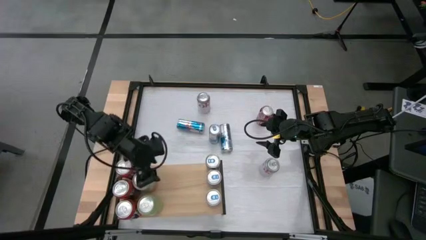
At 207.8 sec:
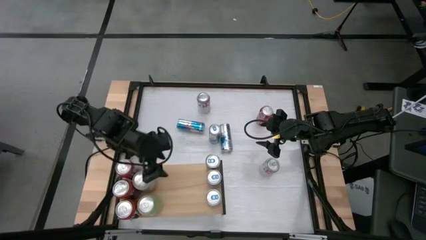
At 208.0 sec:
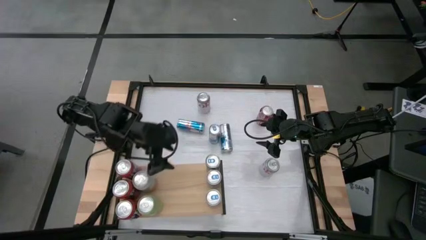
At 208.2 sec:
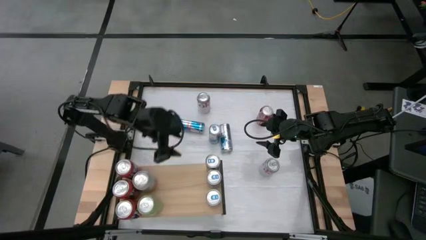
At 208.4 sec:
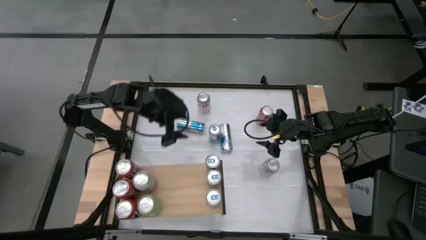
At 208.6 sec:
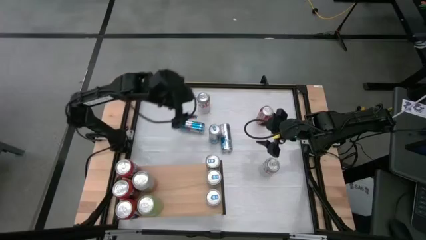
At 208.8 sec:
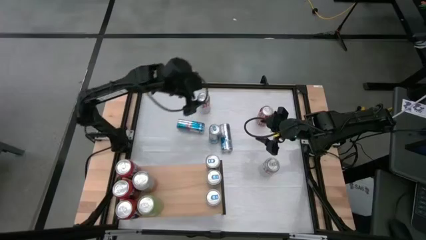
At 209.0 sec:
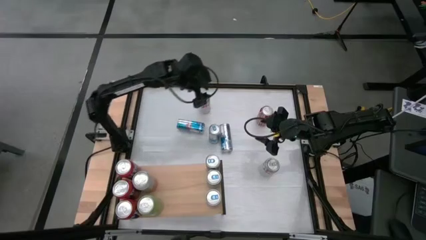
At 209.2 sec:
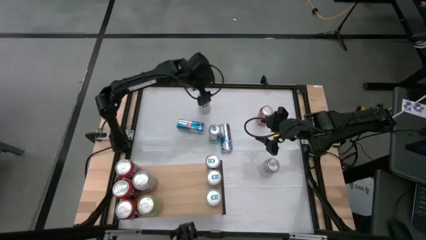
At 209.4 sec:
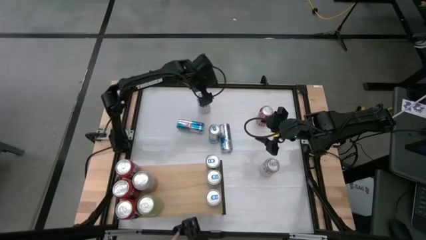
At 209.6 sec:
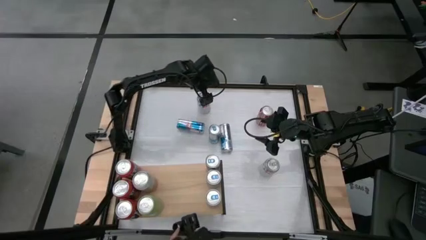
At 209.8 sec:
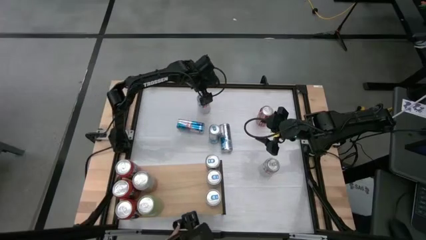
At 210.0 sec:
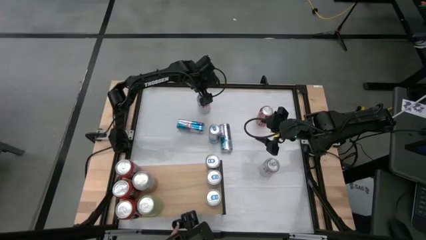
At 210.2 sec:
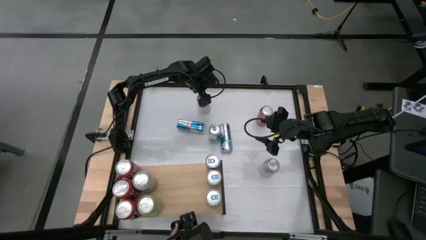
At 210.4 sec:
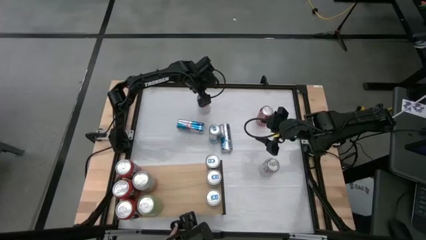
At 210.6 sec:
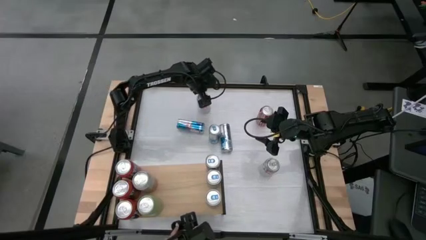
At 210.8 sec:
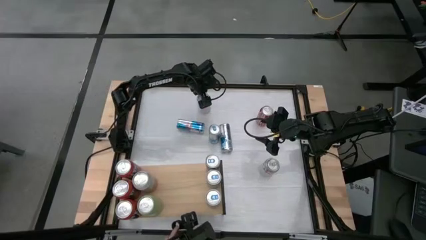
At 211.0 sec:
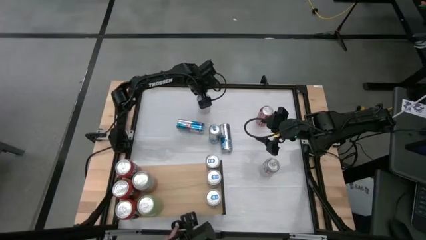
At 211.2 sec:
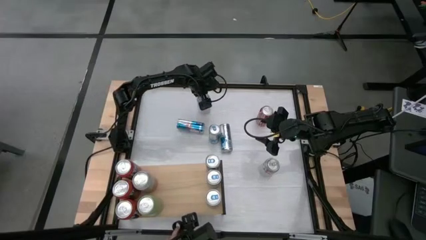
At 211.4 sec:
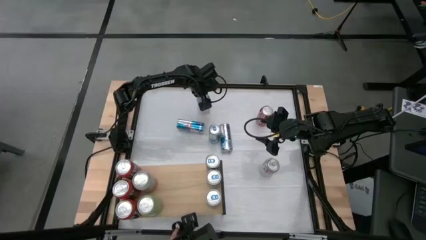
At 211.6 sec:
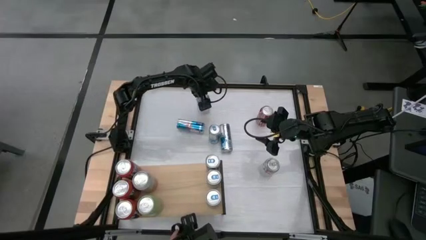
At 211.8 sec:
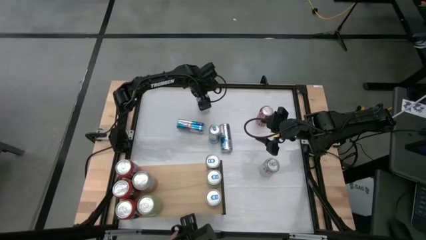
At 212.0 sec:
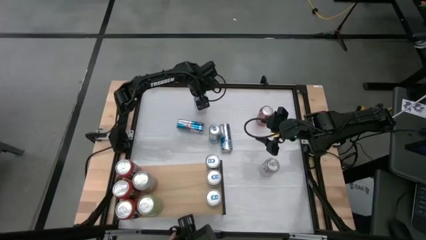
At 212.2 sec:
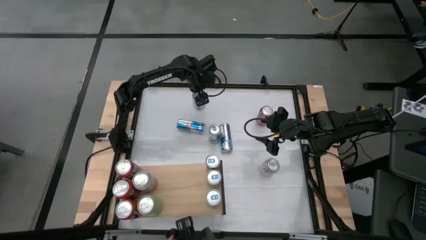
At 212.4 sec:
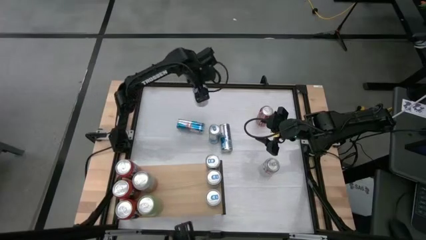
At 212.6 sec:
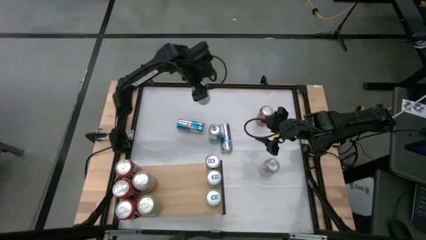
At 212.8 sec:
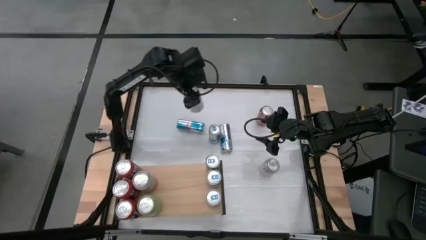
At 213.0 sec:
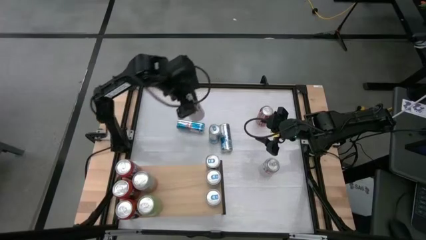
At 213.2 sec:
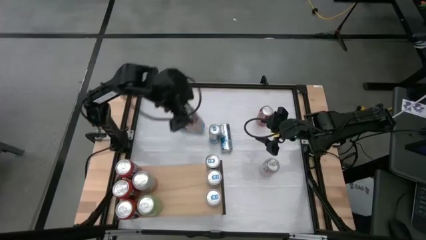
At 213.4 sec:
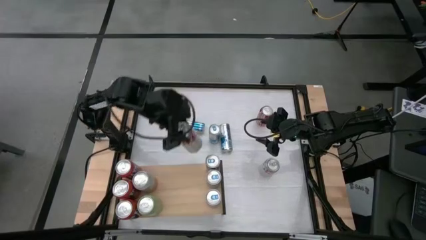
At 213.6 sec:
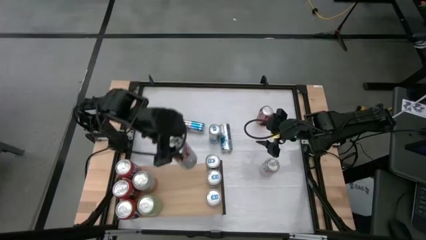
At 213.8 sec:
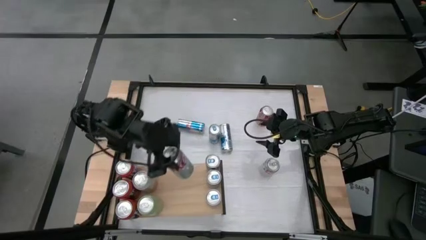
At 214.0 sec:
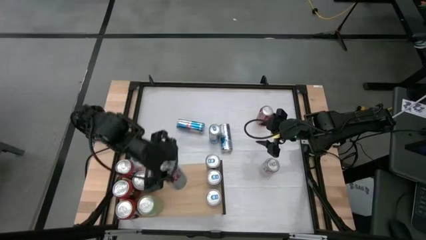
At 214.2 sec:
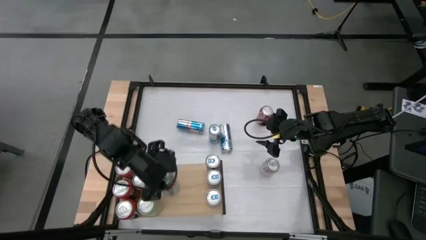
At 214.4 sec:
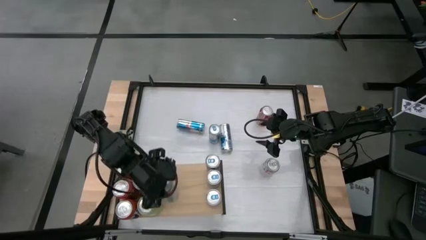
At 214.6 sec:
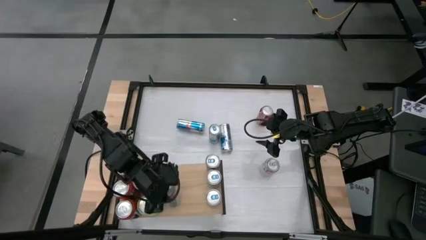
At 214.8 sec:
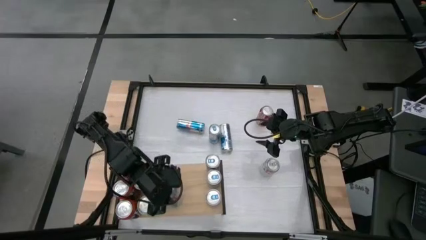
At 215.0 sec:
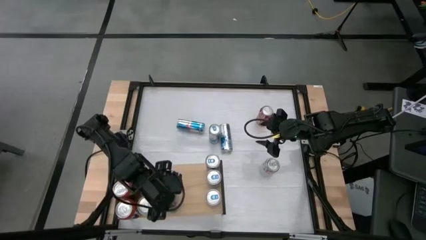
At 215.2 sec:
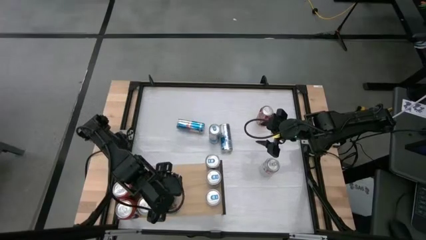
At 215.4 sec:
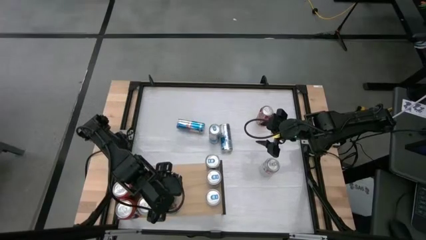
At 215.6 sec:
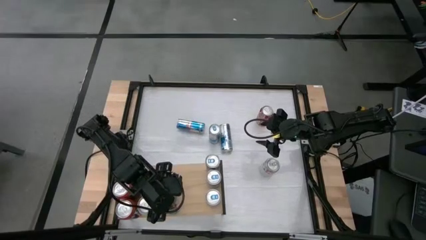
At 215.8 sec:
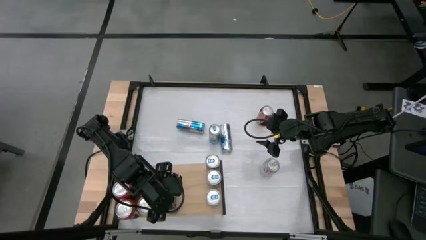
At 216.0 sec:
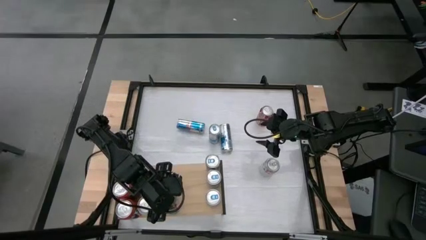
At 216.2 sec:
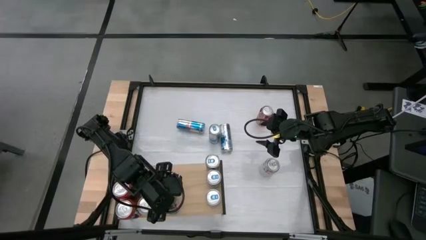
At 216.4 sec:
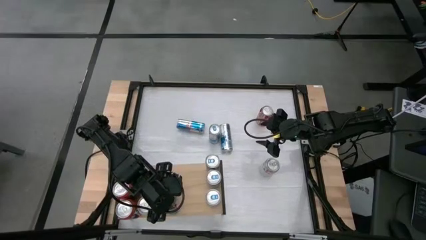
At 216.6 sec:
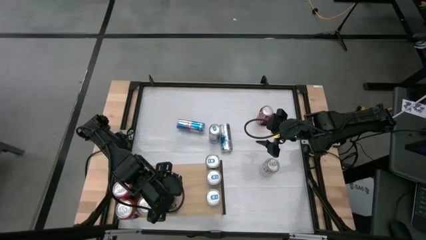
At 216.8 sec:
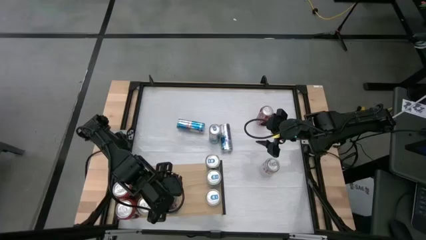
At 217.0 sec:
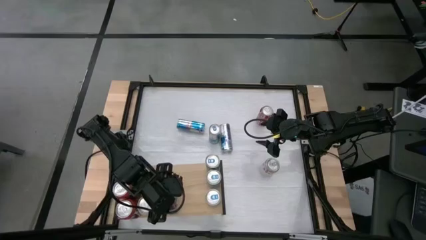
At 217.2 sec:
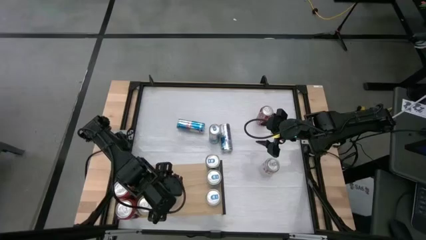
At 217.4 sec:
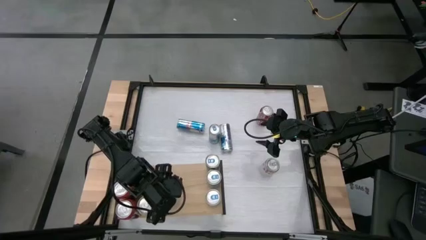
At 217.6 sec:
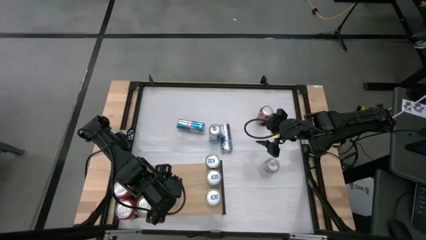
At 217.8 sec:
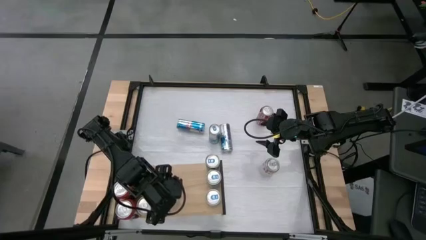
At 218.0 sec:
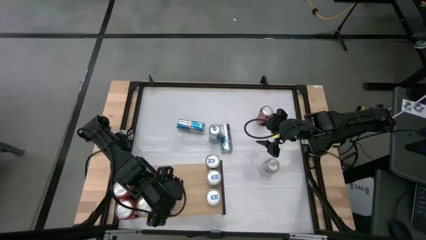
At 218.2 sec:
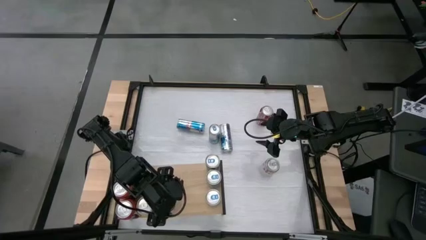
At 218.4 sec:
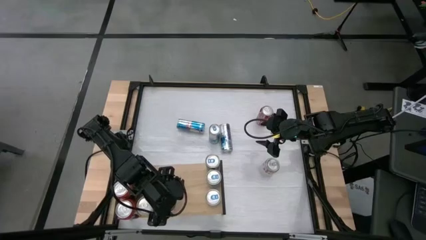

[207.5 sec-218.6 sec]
Task: Place canned beverage on shelf
Put the silver soda can on the shelf

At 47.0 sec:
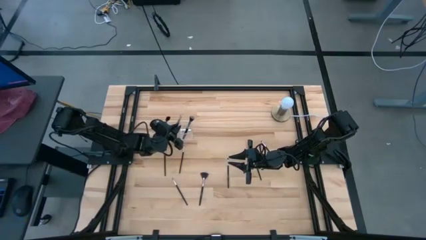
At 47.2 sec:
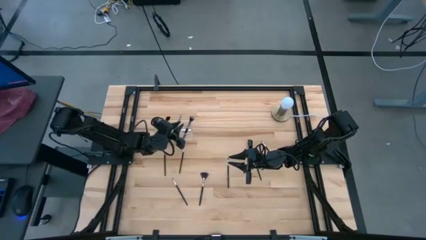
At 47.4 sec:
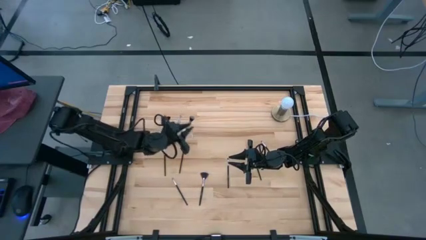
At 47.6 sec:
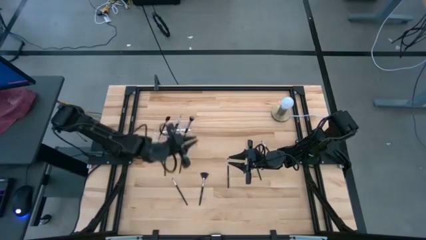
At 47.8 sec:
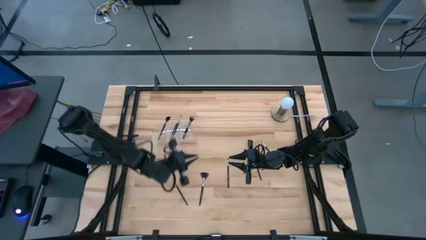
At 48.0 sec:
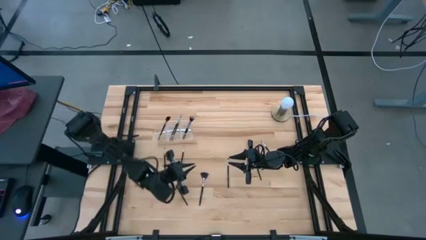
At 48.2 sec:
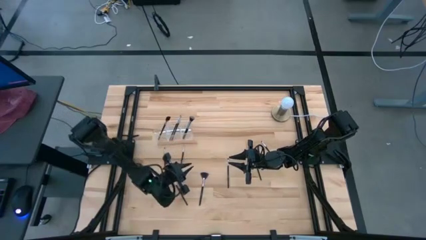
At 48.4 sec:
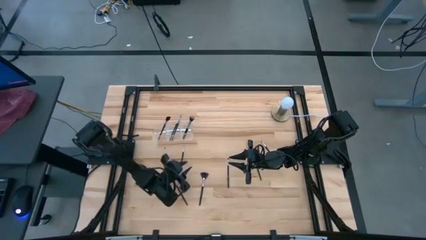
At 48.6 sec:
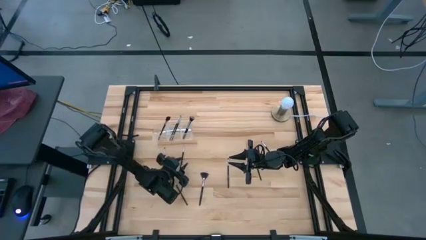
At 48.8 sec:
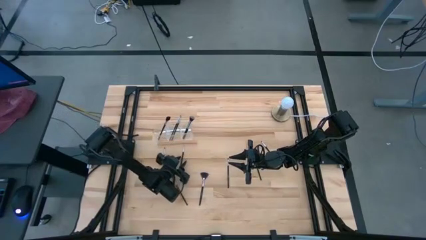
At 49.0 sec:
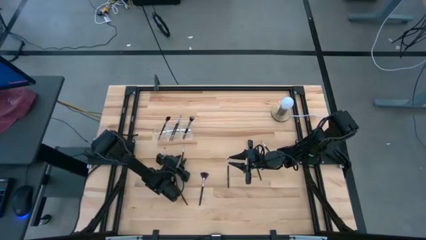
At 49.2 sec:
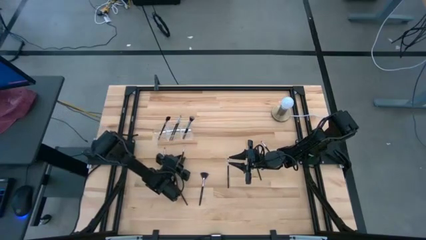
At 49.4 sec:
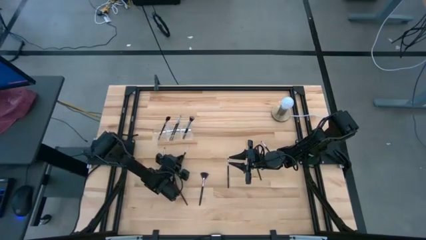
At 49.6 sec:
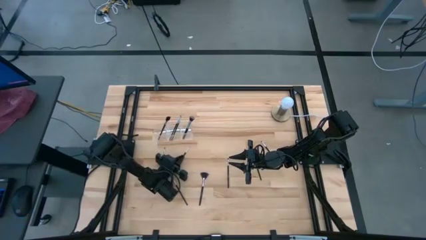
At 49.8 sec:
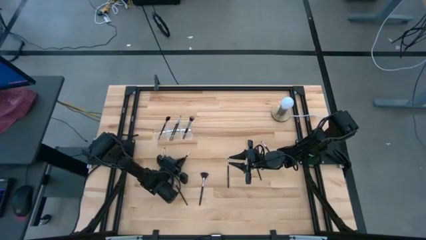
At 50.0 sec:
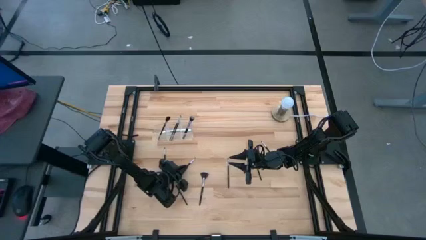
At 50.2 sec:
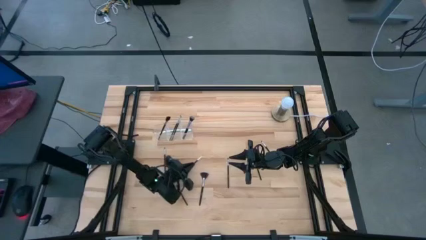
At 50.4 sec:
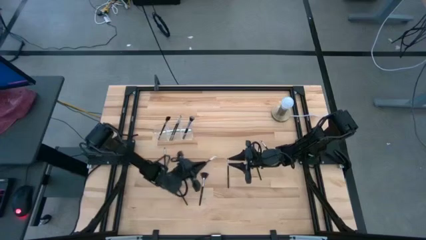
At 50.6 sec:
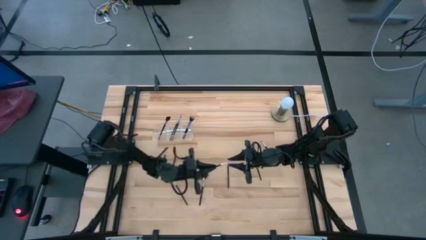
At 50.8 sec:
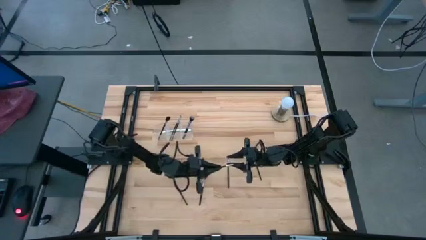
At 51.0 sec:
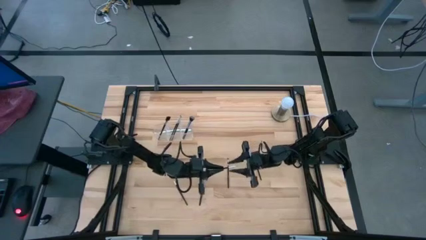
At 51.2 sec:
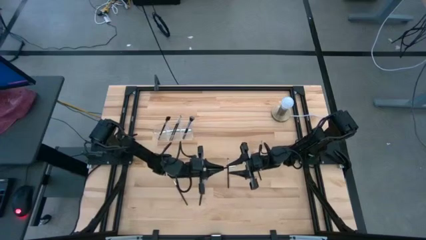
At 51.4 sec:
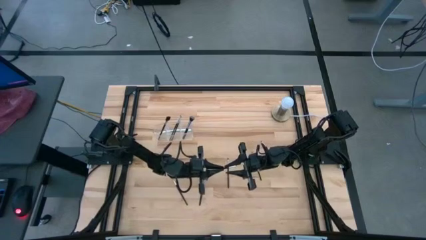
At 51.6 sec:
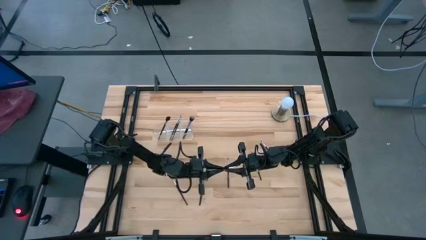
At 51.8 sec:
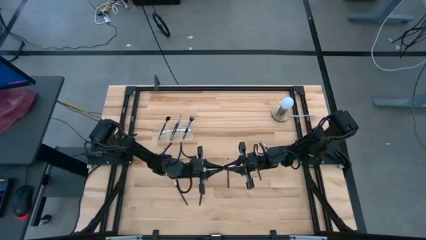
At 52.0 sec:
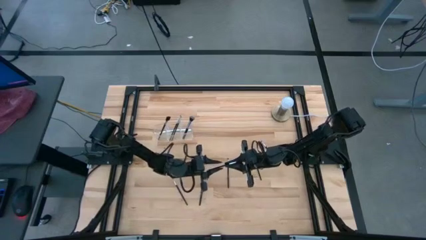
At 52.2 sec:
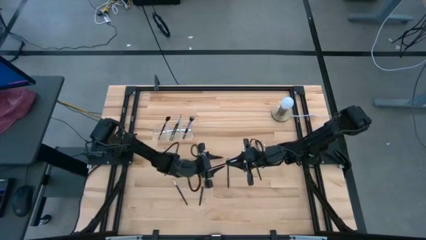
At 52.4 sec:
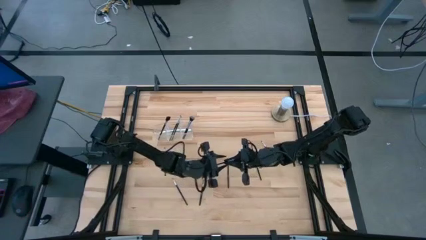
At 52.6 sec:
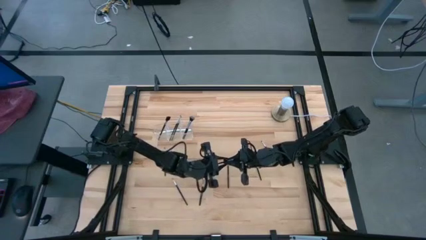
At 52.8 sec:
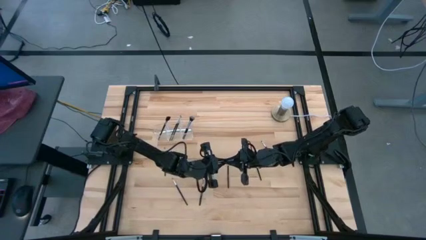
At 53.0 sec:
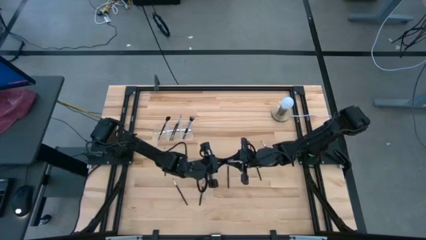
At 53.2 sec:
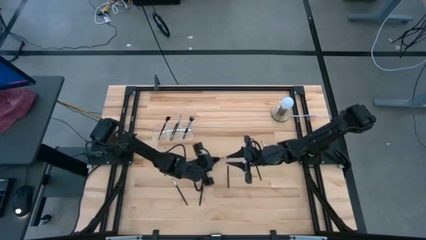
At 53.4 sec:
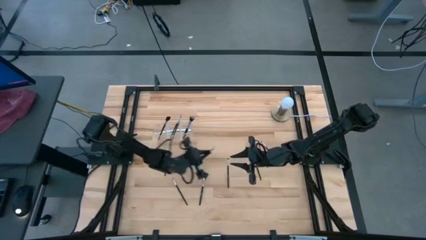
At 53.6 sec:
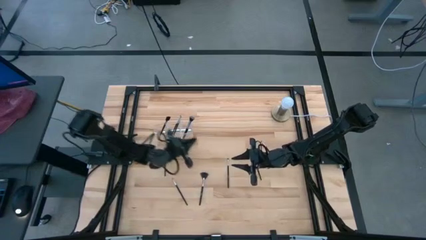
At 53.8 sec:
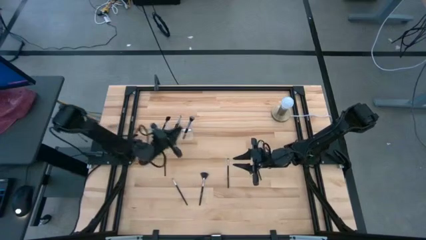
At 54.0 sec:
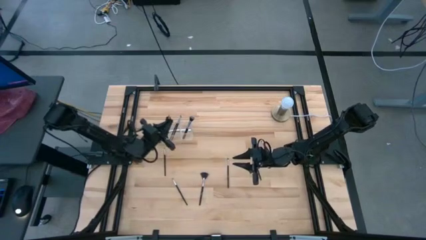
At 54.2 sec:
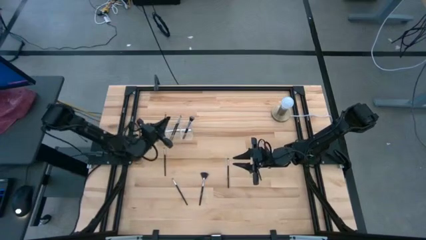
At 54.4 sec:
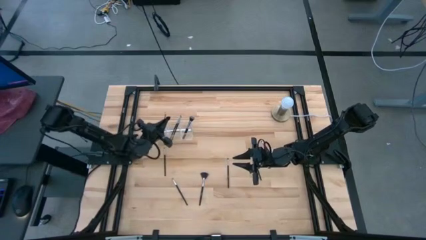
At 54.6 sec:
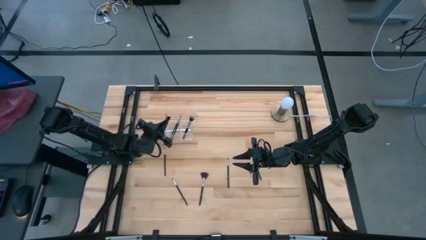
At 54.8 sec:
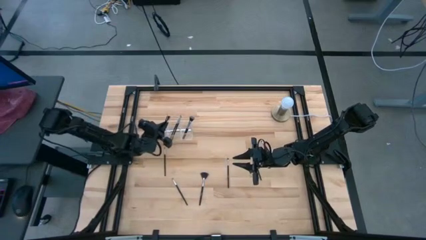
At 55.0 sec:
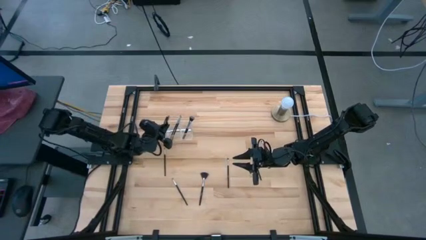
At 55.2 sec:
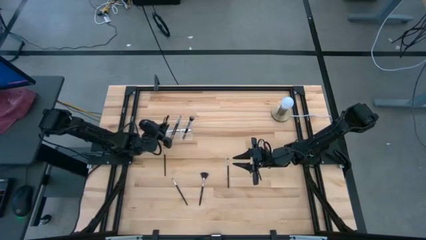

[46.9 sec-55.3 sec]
Task: Pick & Place Makeup Brushes
Put the black liner brush into the transparent organizer
